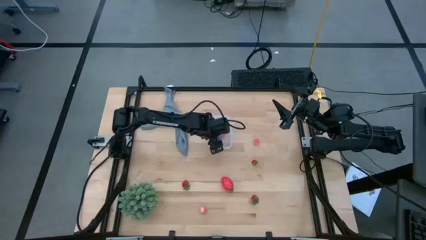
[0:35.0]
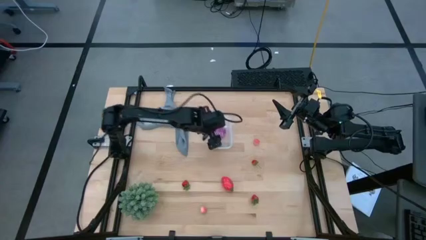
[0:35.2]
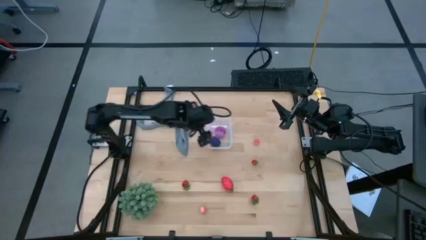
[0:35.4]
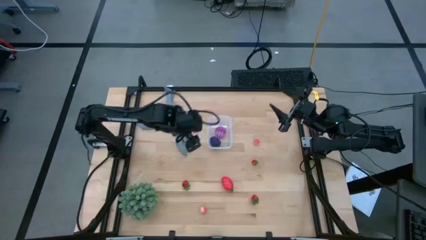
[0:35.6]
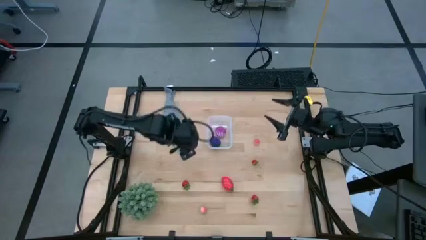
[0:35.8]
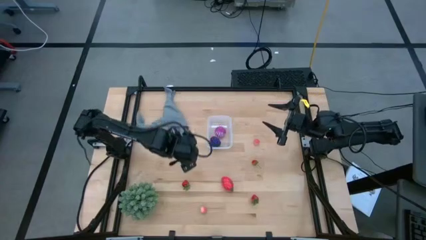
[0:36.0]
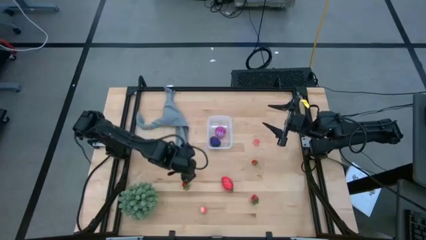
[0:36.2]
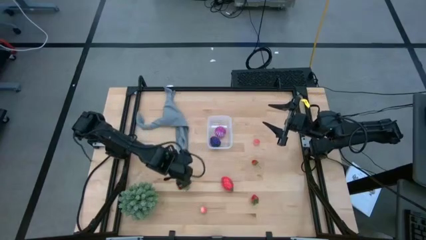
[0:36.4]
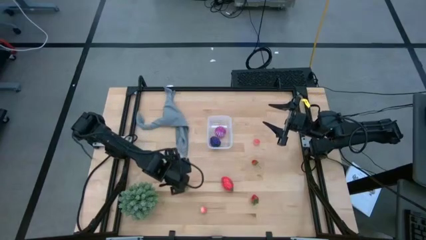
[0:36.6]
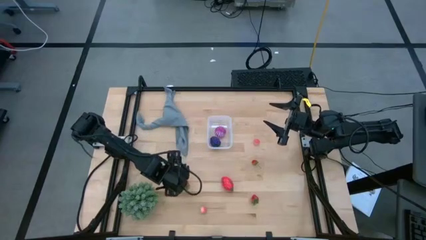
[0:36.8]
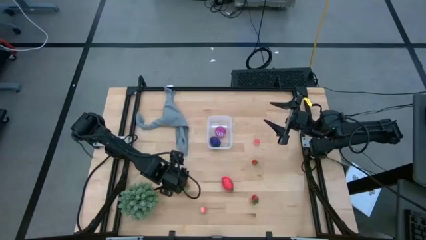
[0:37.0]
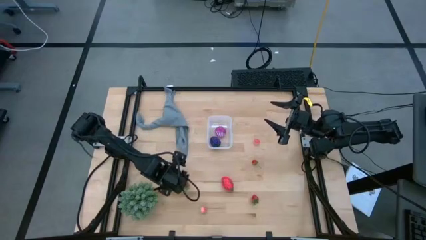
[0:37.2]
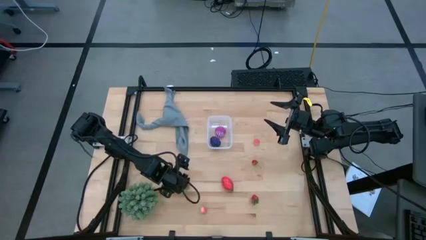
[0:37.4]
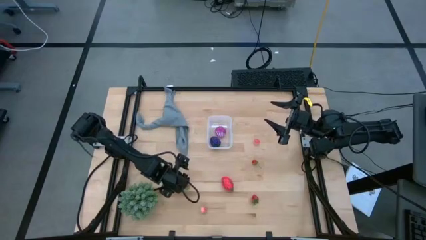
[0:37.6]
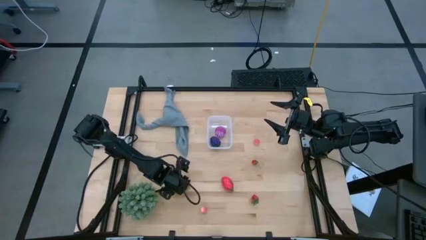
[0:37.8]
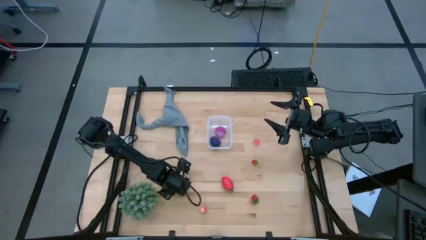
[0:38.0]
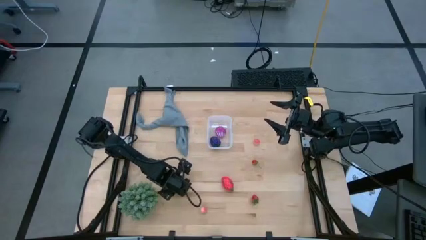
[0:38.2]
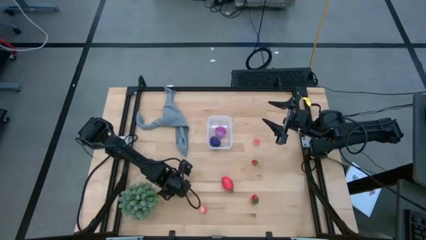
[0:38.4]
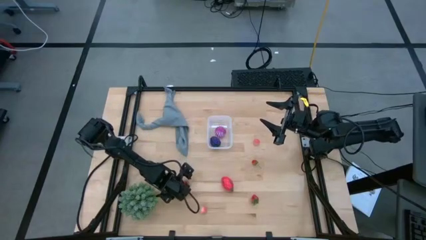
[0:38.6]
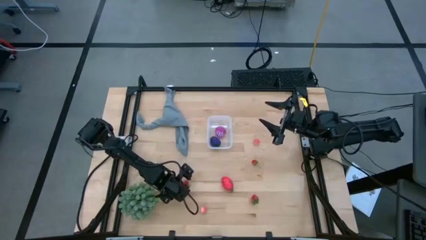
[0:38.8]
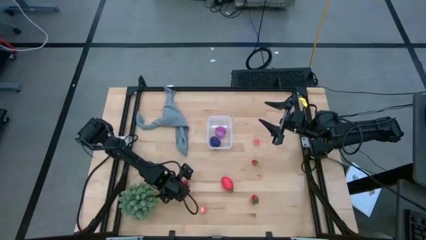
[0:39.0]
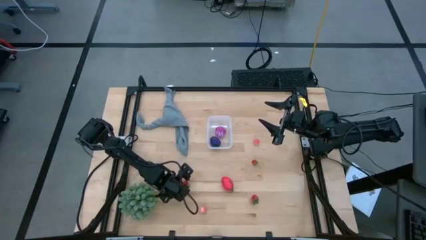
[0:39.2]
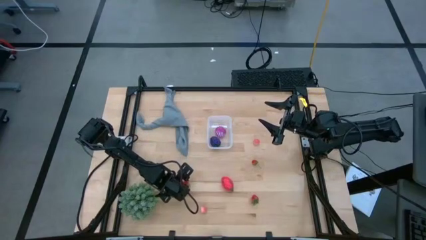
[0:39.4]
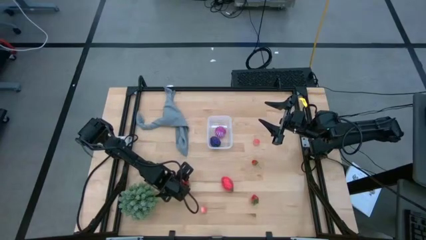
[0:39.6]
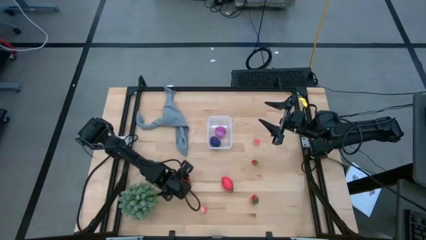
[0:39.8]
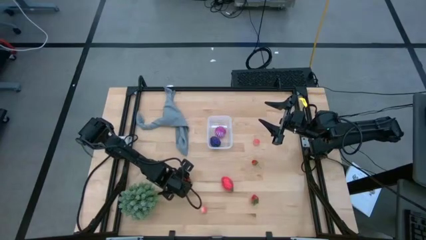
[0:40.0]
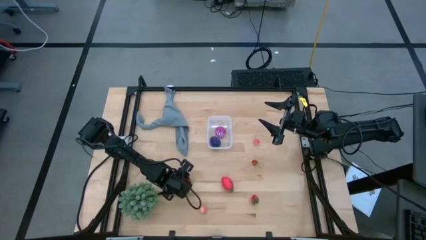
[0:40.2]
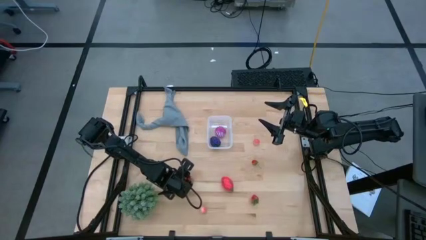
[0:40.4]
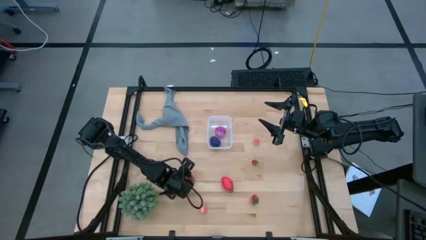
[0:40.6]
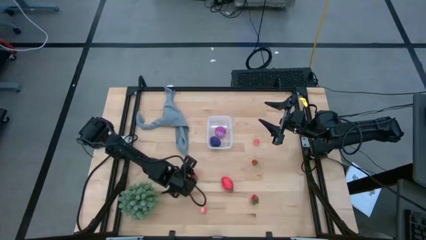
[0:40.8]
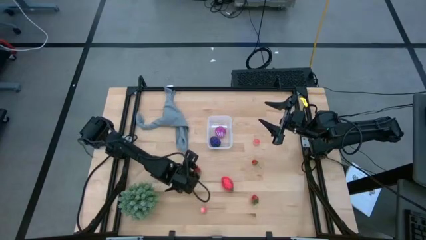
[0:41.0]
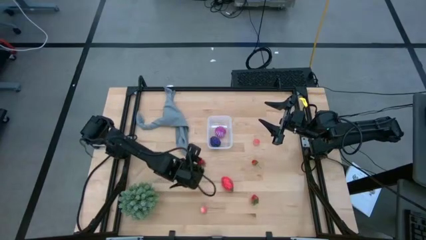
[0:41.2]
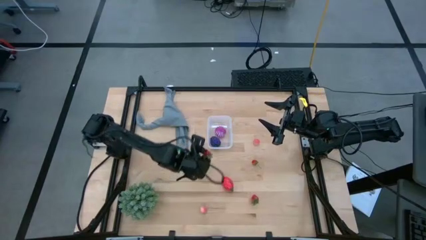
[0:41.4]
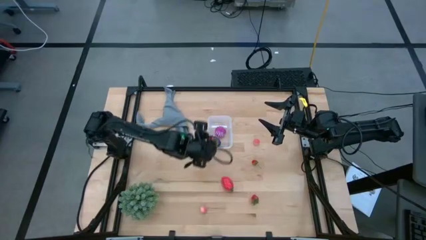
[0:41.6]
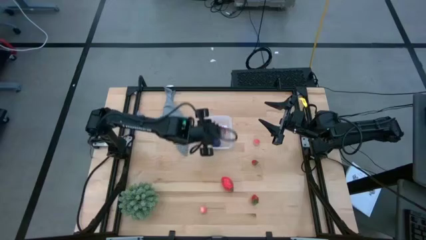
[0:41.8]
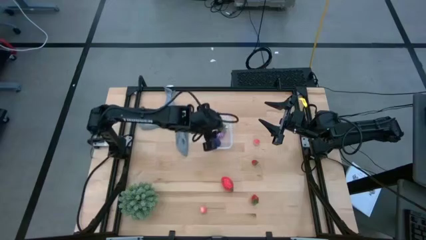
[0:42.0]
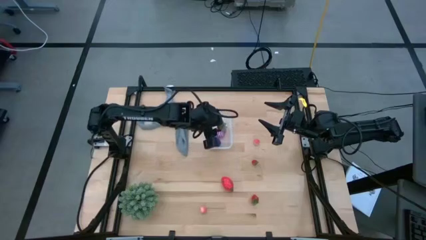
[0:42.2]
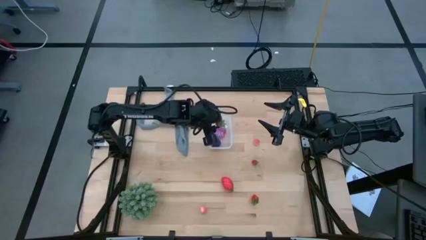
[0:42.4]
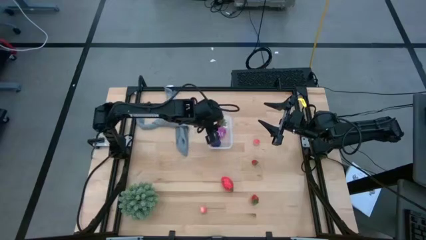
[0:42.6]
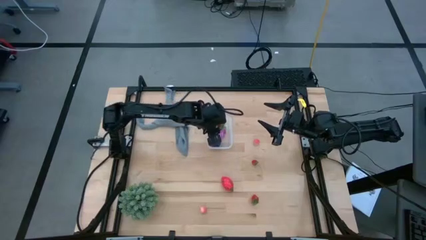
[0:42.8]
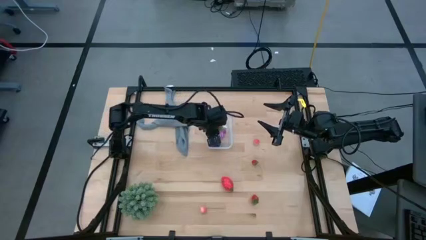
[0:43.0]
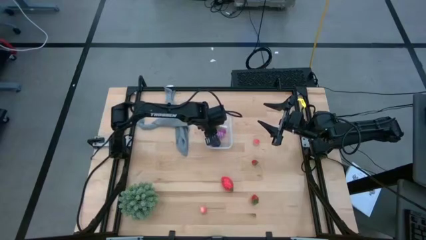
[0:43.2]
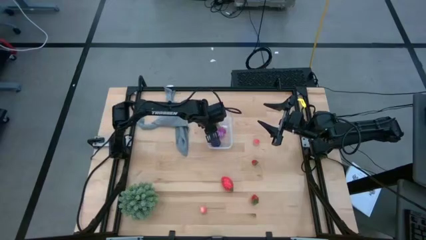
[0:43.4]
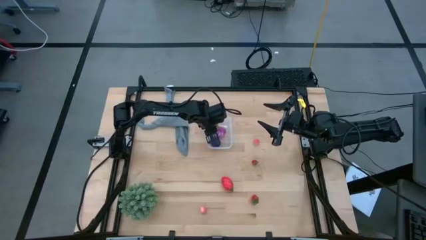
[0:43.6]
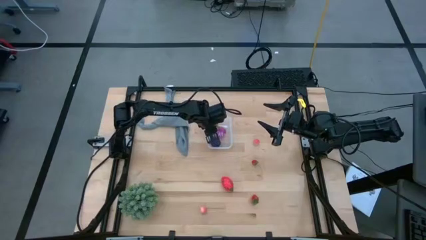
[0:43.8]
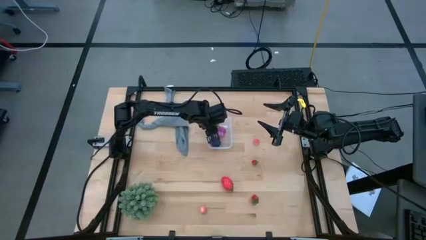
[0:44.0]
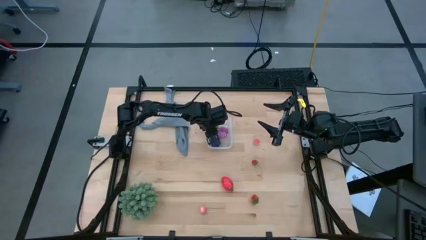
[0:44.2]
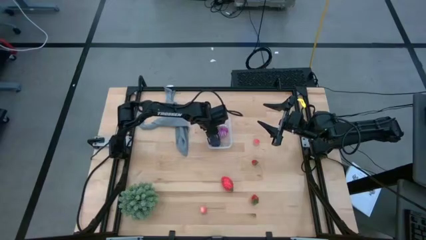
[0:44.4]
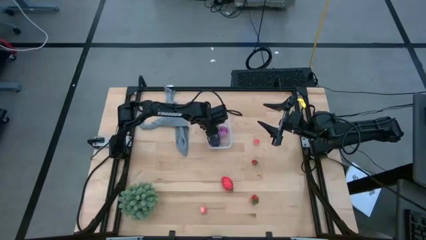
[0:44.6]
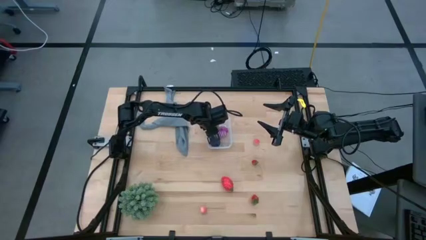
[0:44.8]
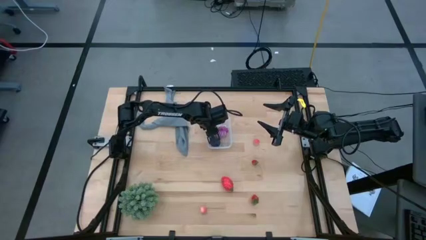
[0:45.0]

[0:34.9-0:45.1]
Task: Pick and placing Produce into tupperware
Put the middle left red strawberry into the transparent bin

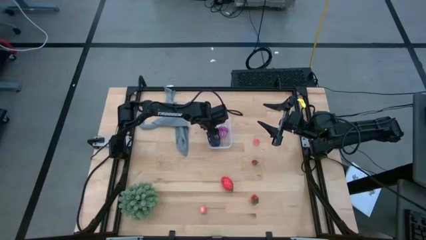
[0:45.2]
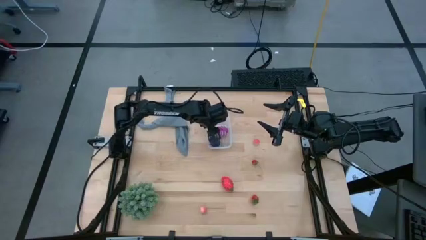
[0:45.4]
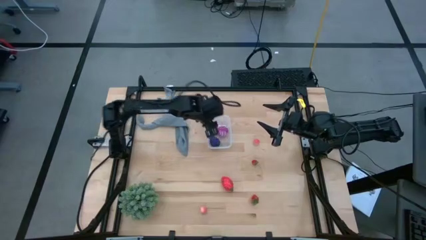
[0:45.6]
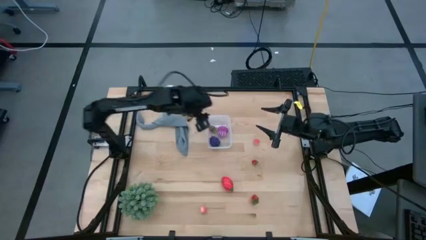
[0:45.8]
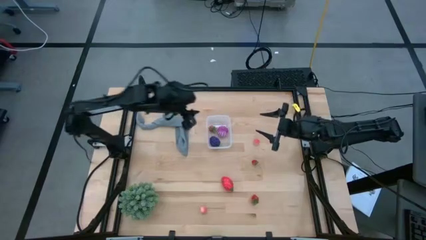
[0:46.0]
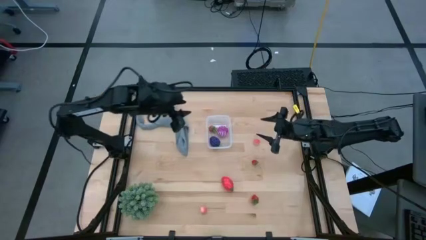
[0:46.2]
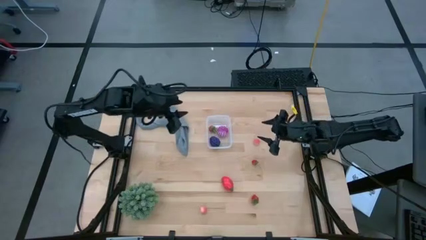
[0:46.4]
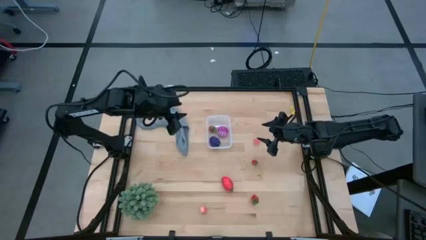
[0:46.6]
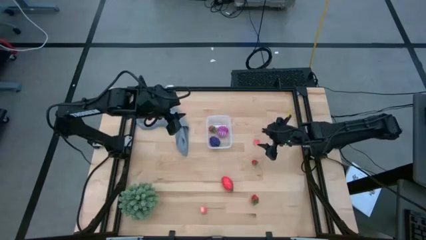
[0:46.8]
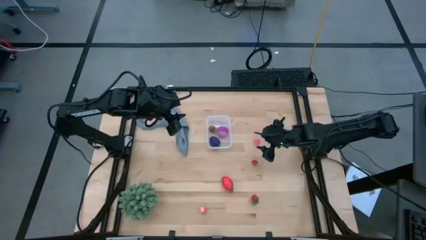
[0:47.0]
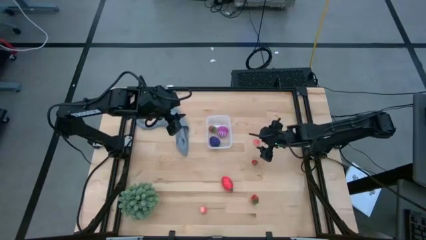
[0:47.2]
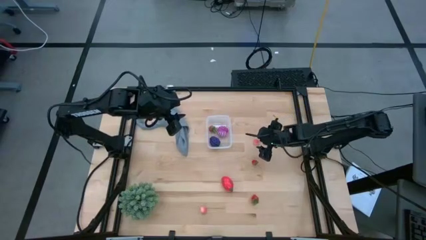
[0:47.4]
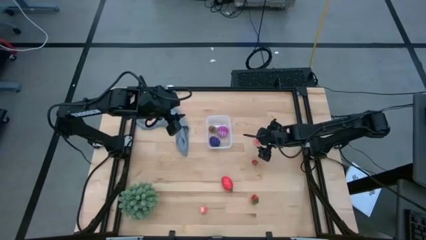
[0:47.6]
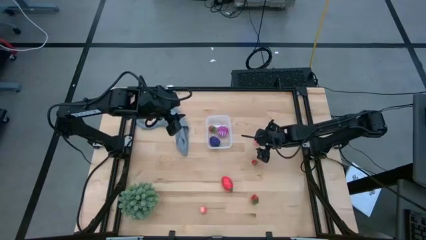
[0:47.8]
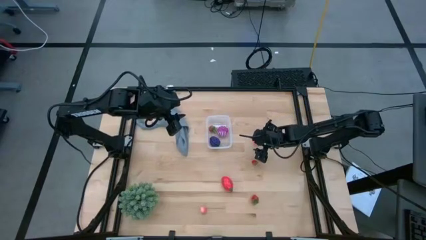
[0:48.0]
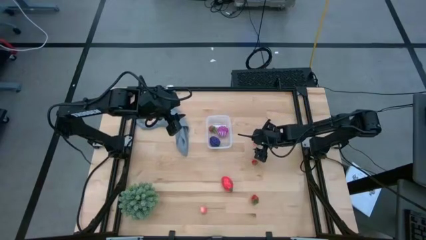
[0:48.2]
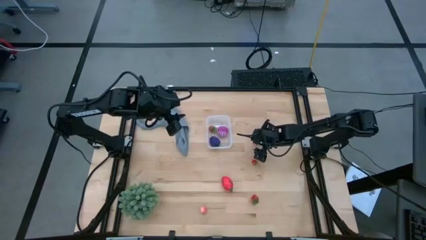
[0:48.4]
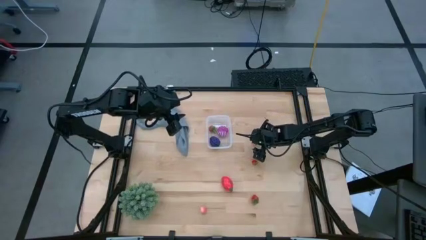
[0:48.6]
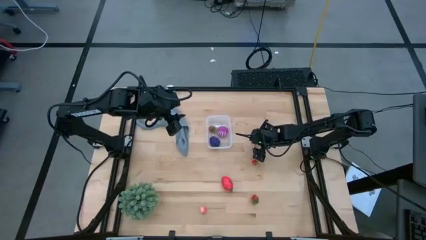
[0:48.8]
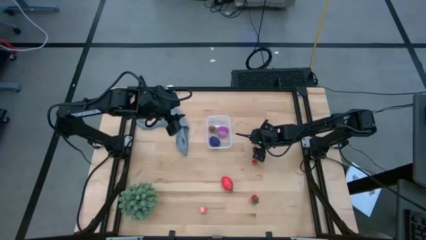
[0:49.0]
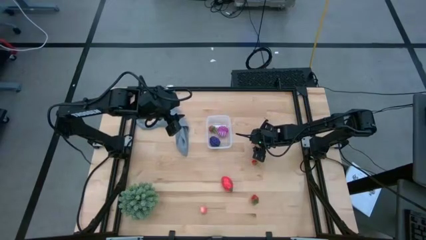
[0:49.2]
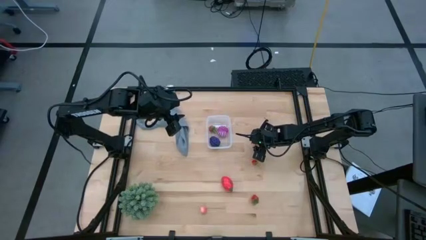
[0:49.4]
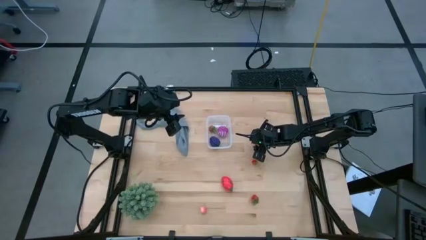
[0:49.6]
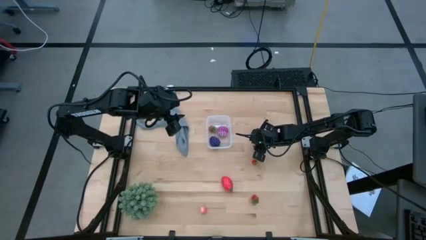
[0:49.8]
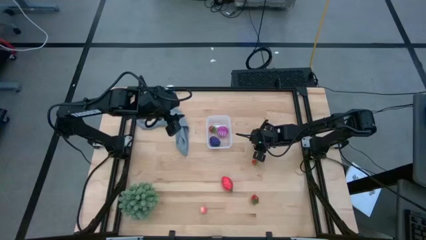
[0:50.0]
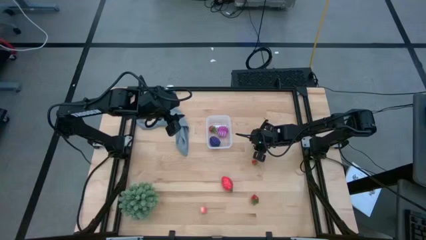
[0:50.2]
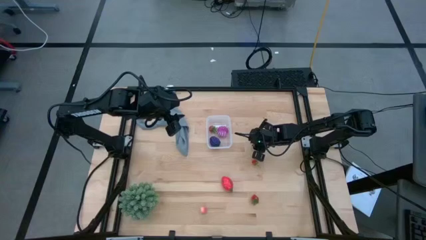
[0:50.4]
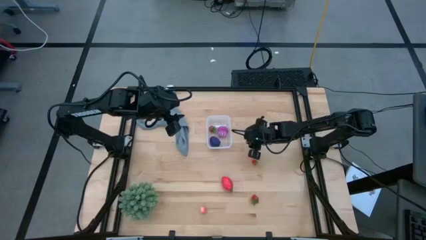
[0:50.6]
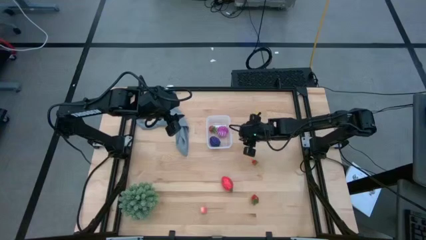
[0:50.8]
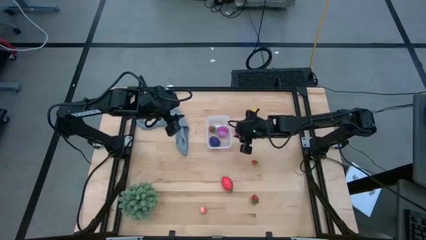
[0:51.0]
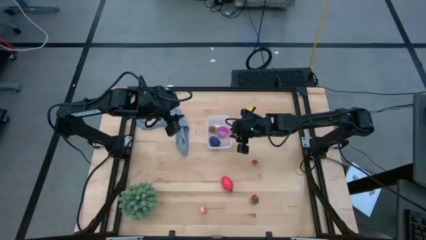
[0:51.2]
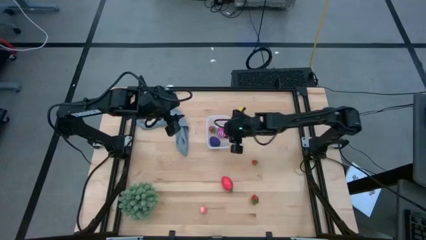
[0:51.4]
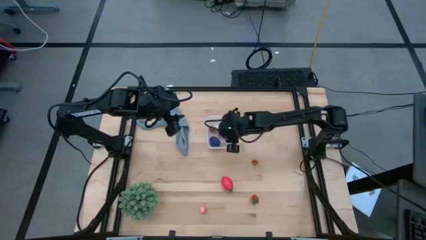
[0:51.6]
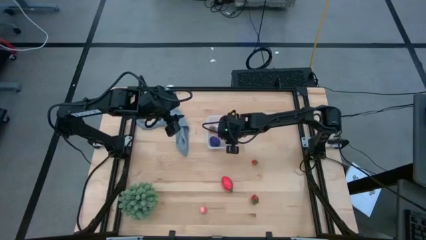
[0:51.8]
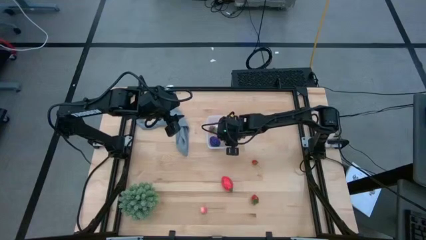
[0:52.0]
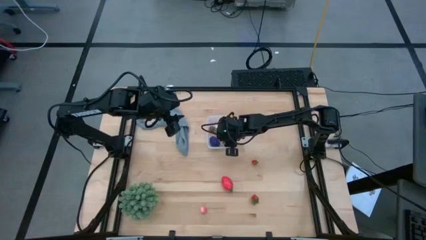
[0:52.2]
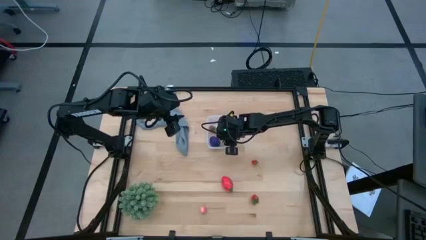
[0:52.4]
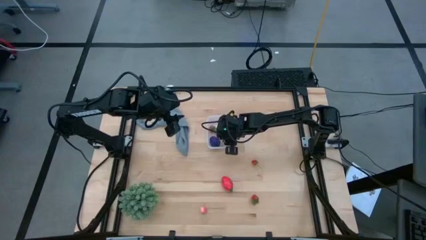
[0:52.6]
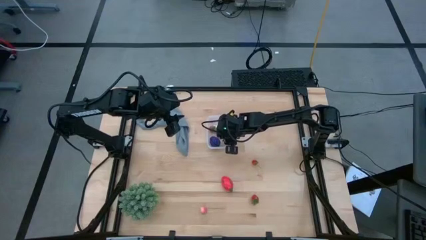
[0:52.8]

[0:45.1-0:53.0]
Put the top pink peach into the transparent bin
